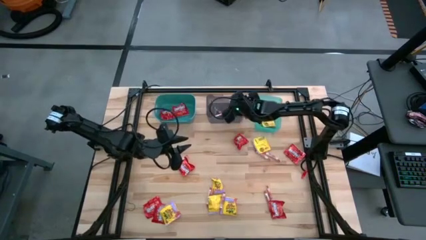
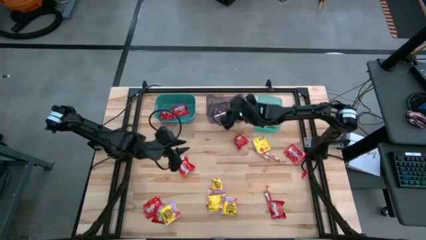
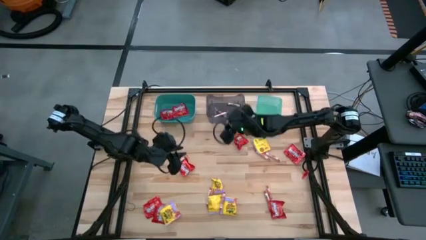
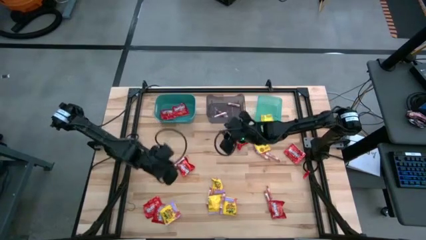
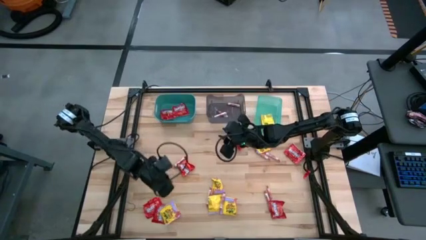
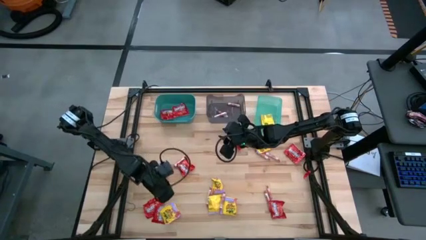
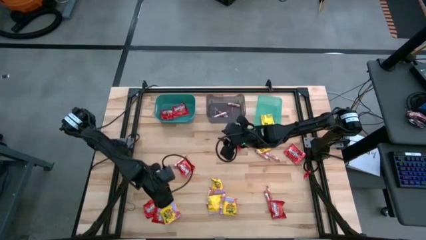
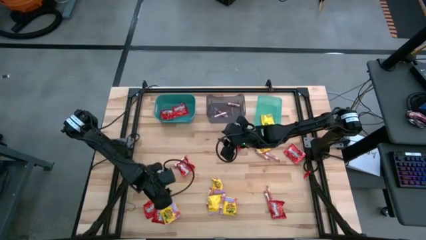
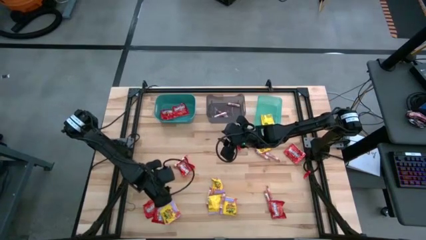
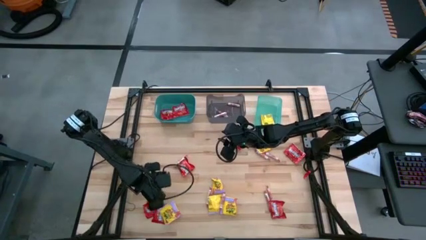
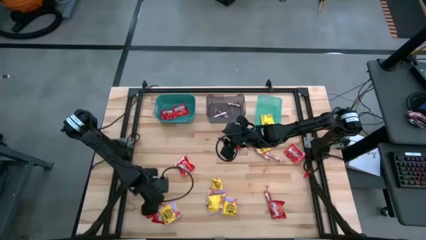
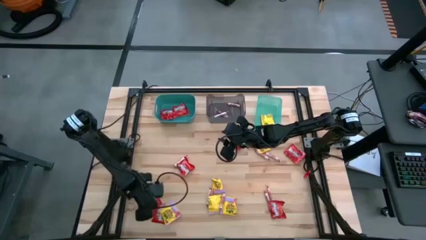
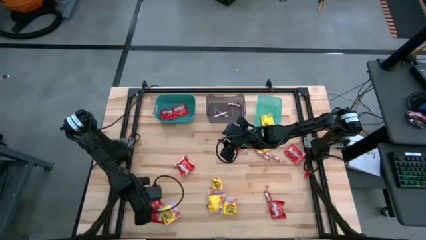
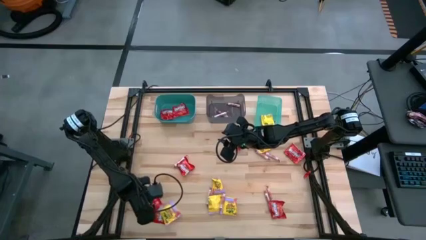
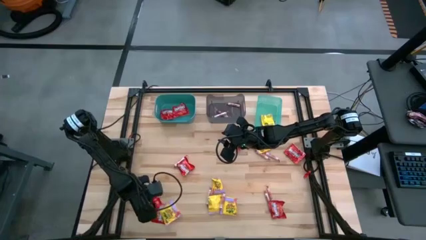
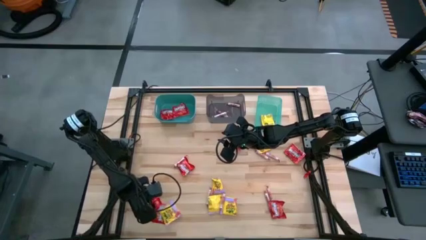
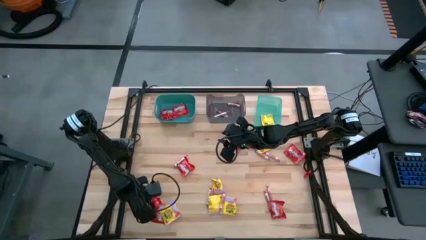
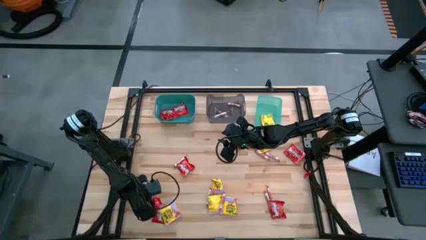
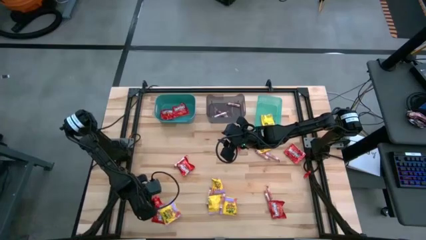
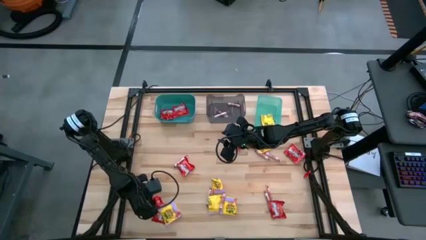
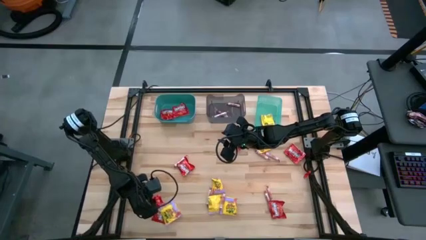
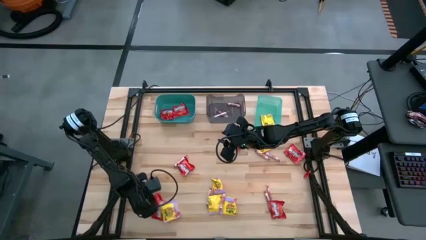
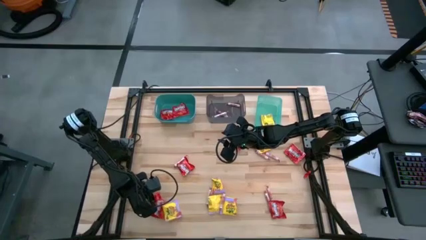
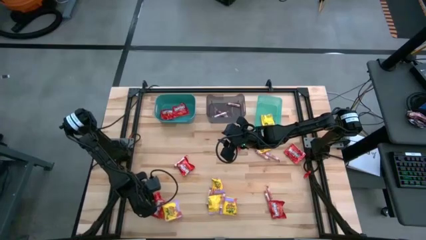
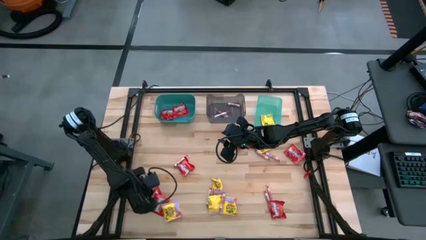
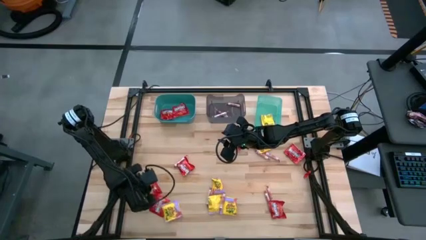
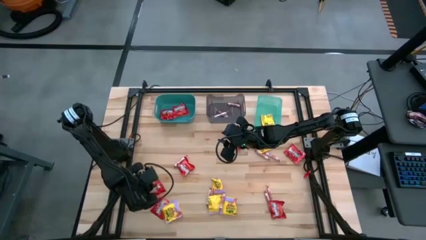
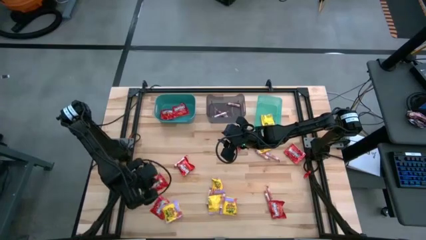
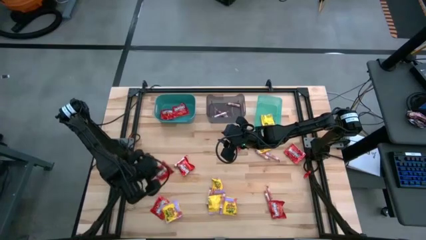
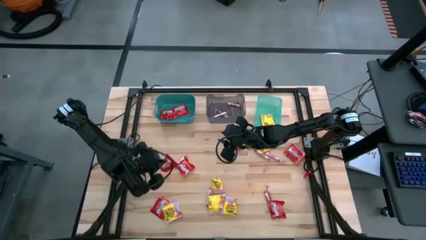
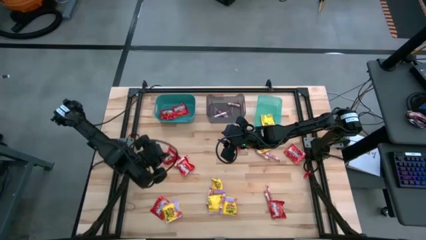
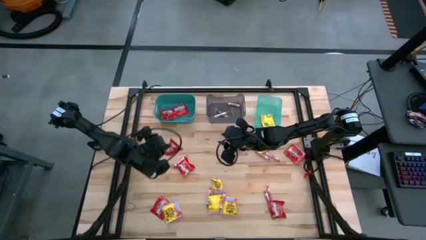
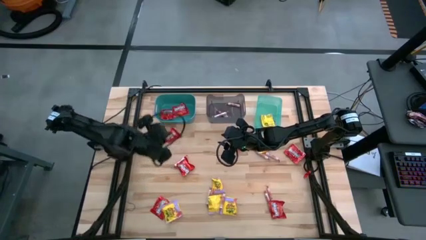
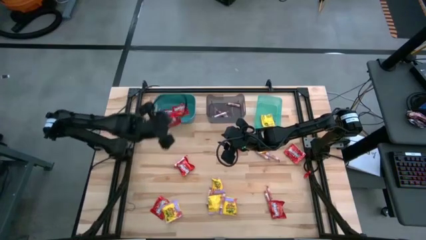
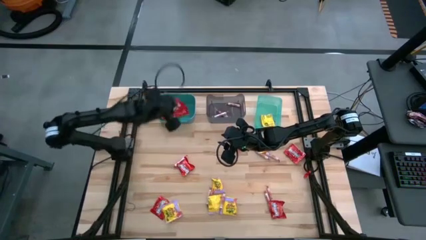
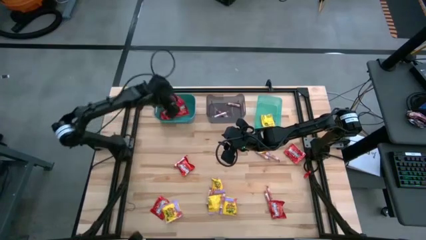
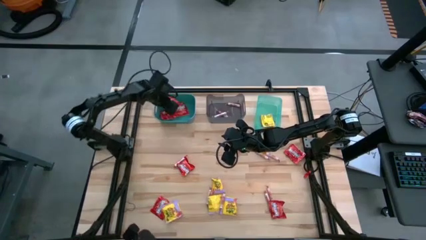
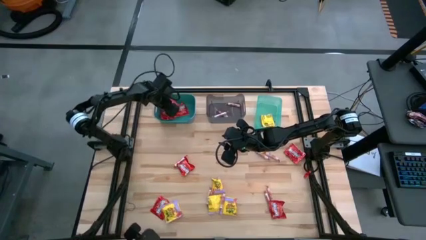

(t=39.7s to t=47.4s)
Task: Sort candy
Put the red candy into the green bin

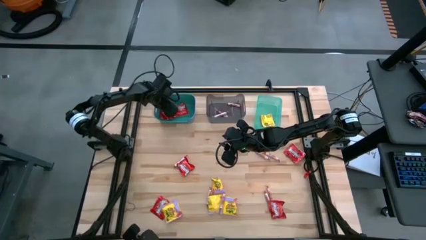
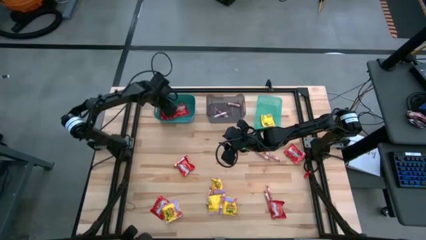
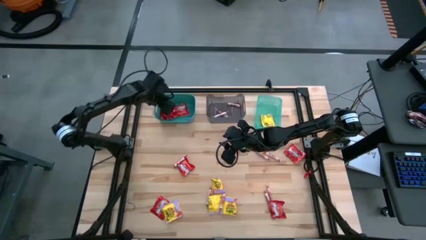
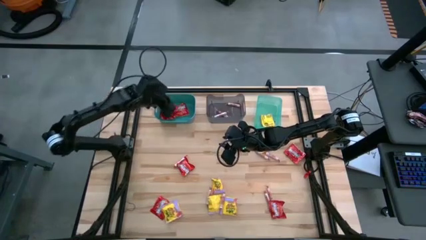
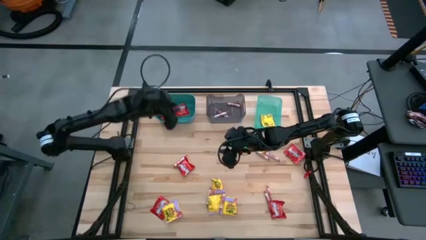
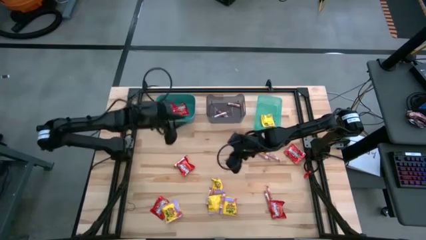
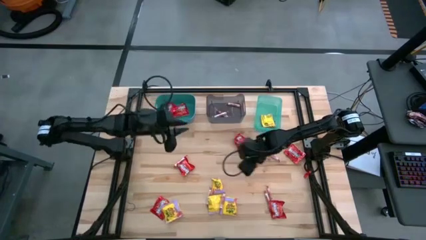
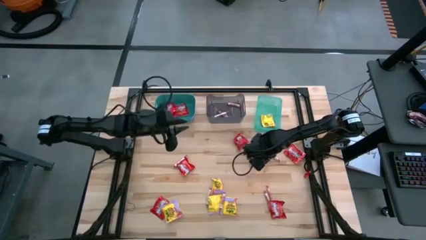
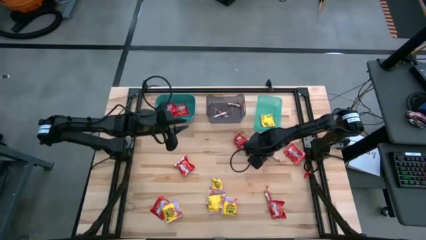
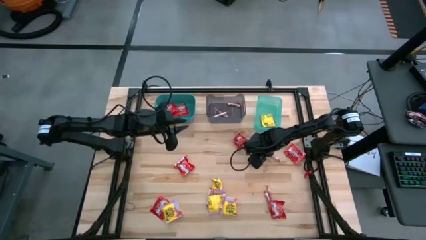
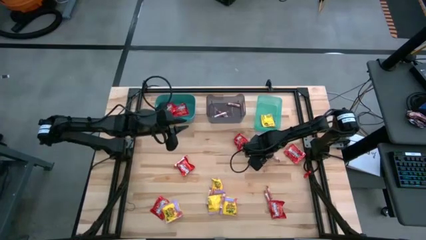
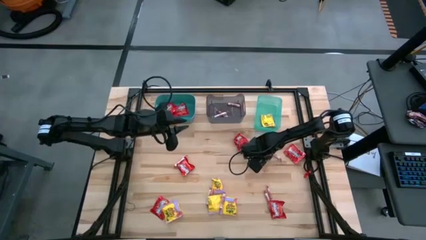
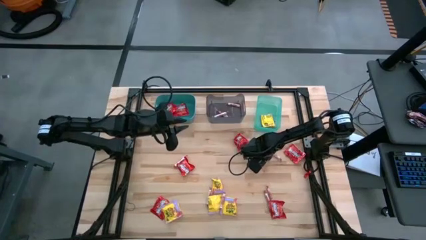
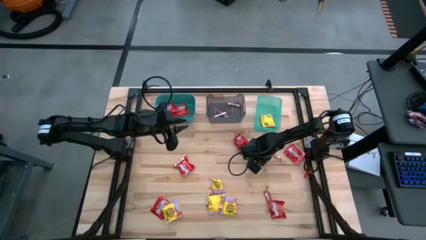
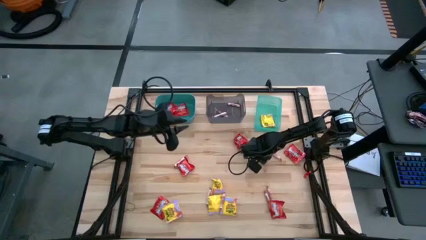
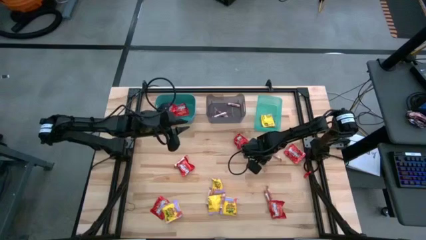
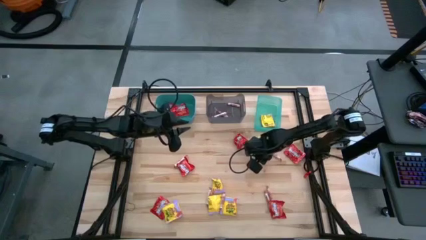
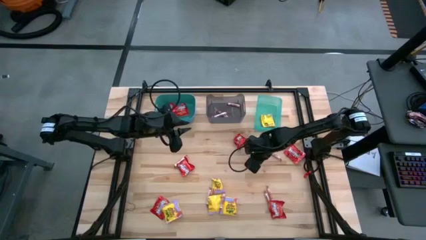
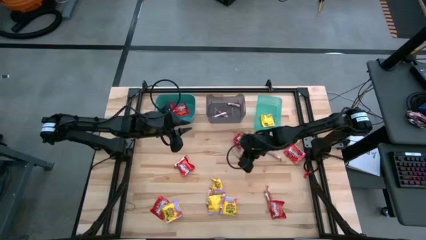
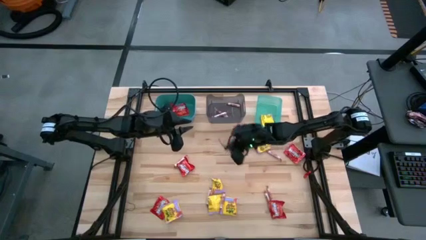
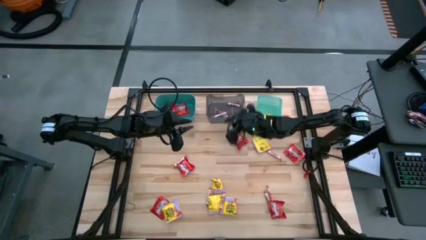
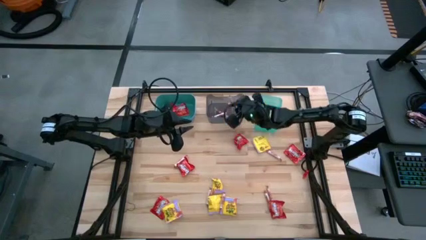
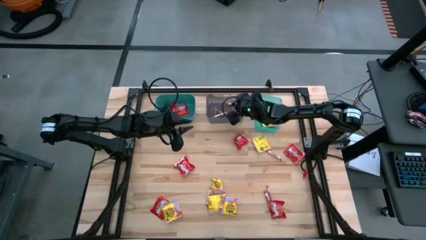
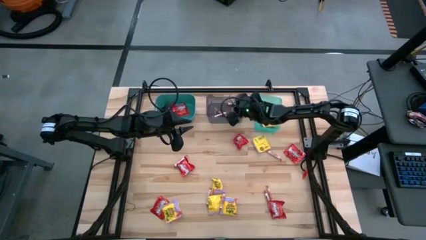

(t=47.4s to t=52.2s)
Put the white candy into the black bin

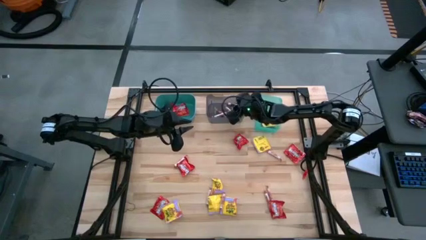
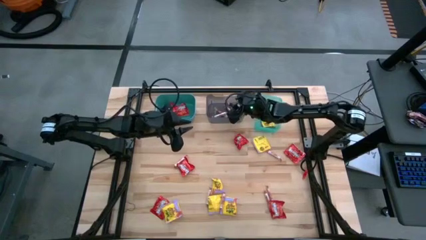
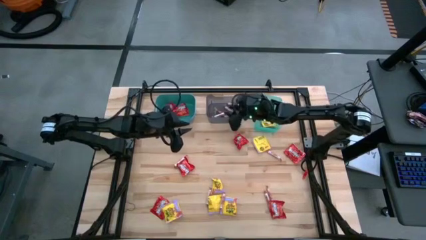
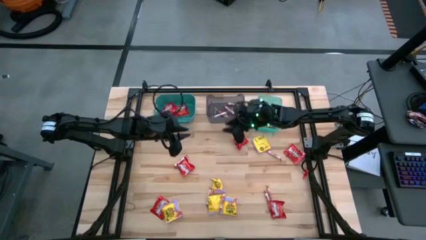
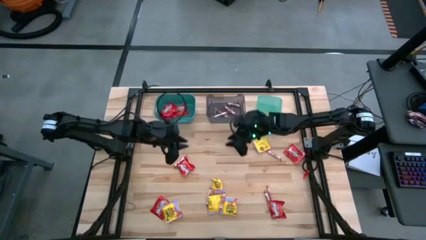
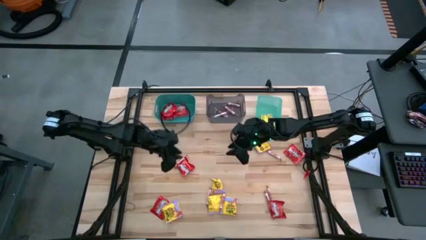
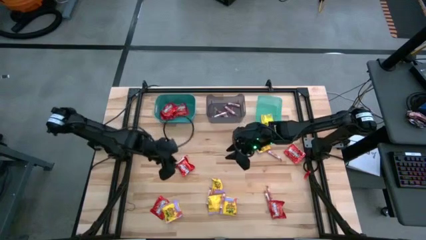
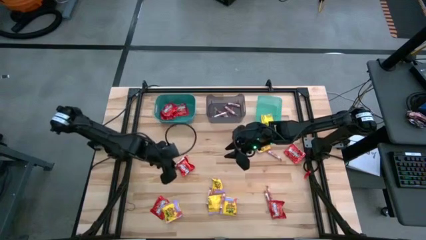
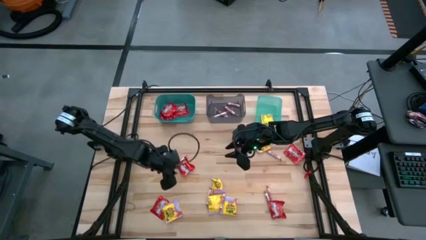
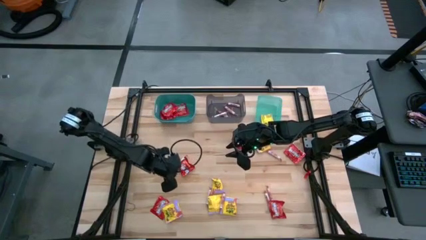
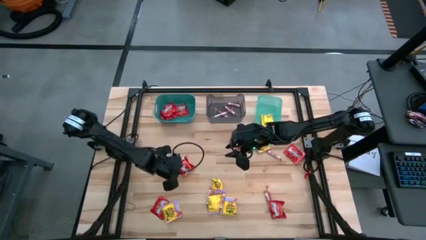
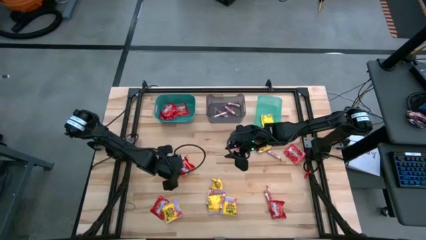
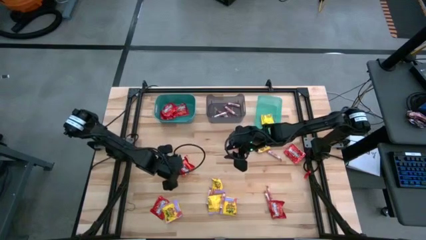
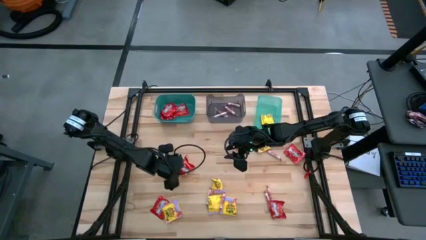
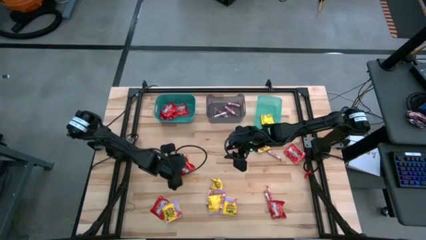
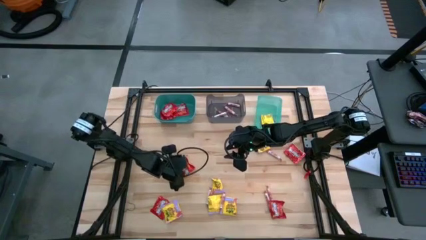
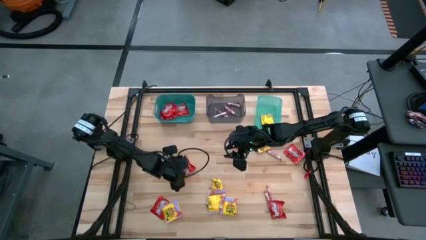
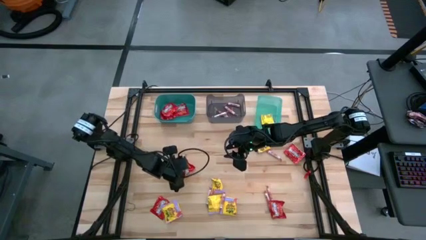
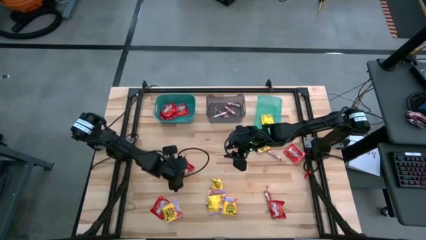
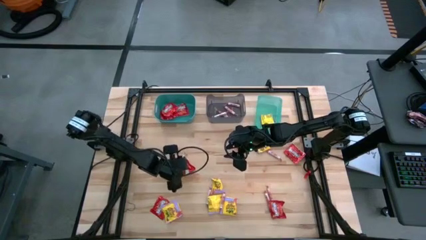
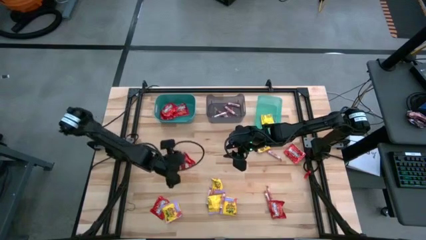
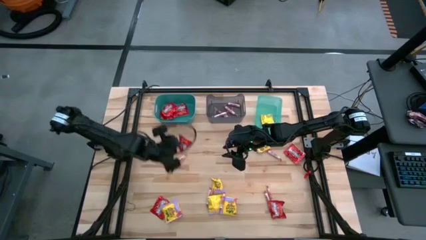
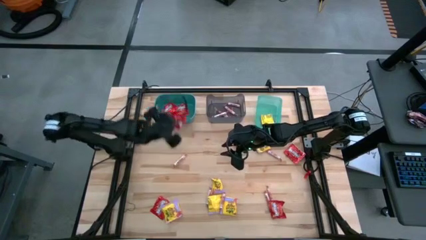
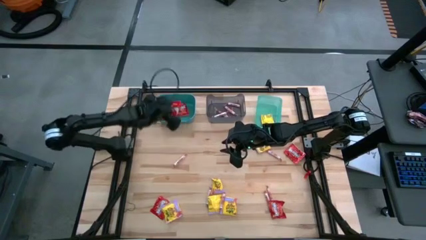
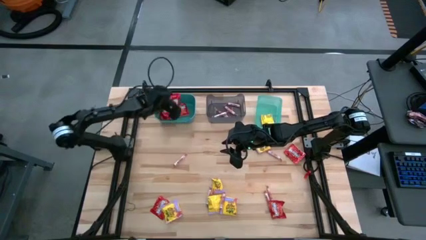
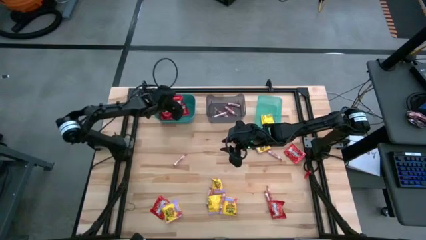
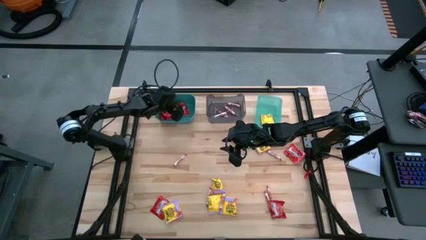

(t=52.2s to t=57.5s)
Put the red candy into the green bin
